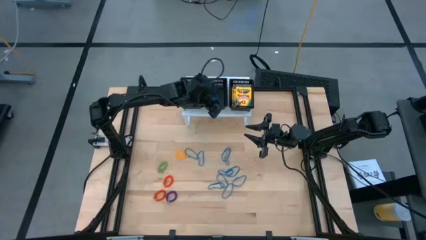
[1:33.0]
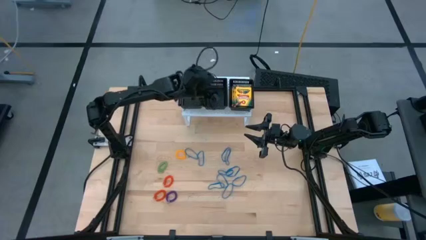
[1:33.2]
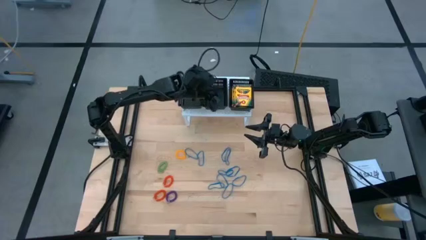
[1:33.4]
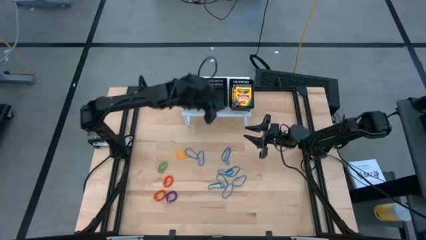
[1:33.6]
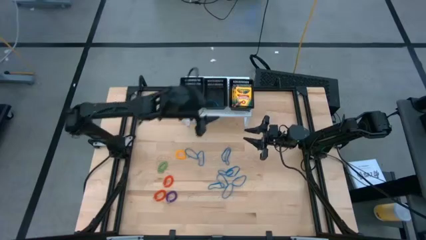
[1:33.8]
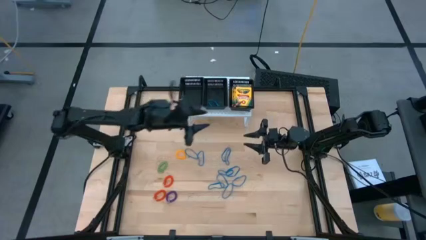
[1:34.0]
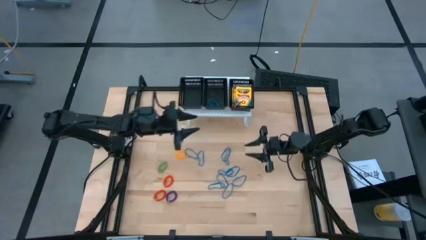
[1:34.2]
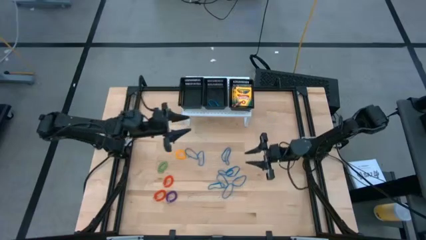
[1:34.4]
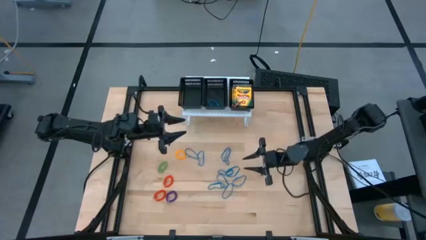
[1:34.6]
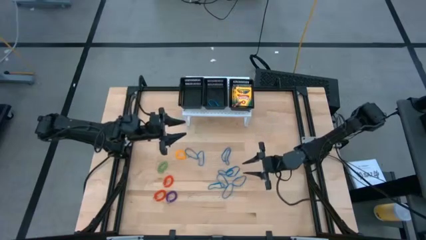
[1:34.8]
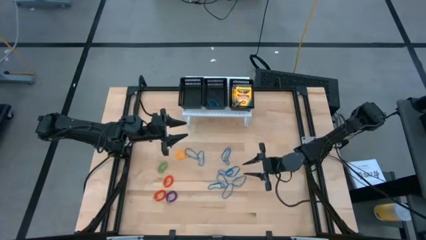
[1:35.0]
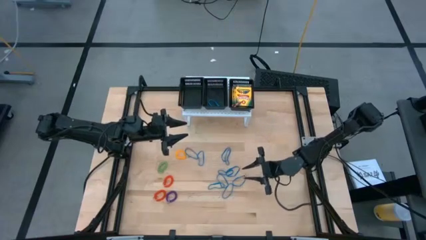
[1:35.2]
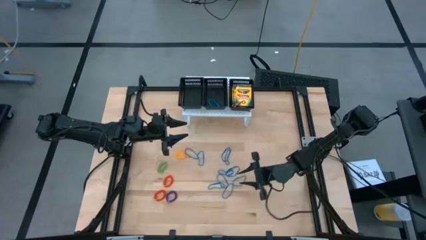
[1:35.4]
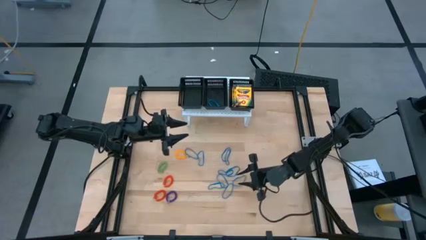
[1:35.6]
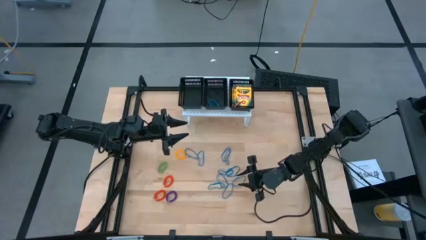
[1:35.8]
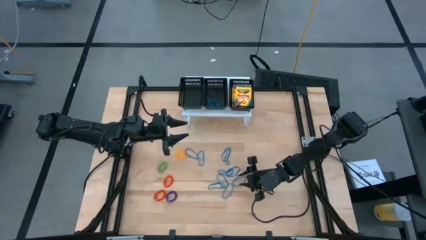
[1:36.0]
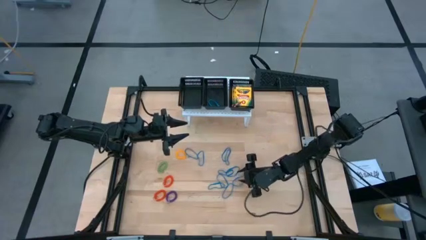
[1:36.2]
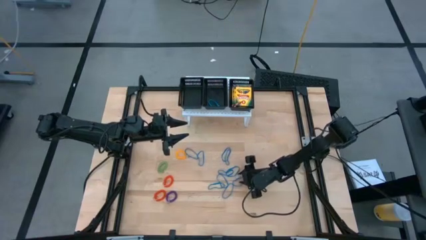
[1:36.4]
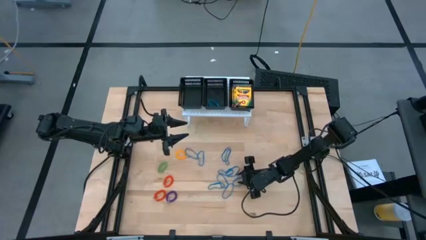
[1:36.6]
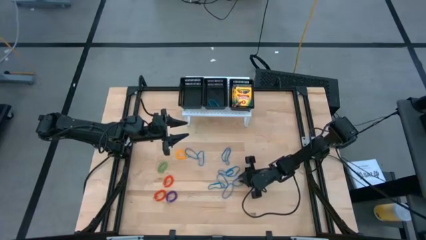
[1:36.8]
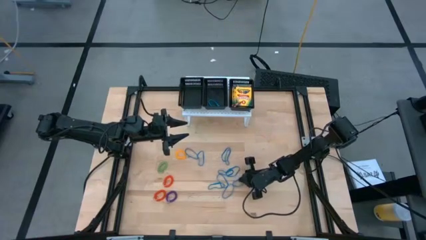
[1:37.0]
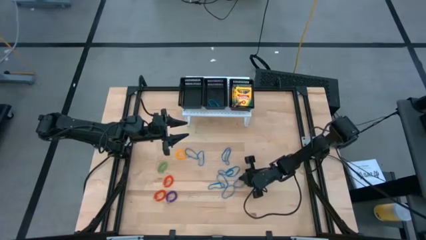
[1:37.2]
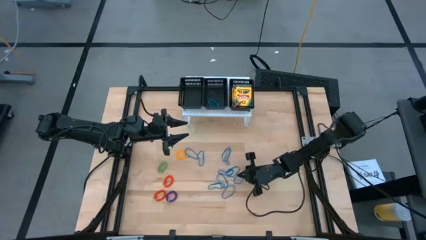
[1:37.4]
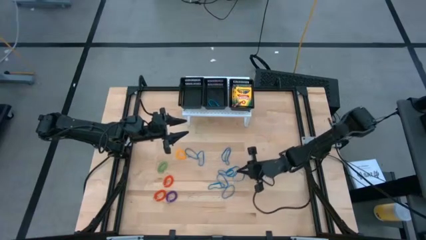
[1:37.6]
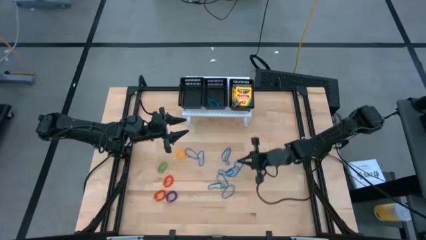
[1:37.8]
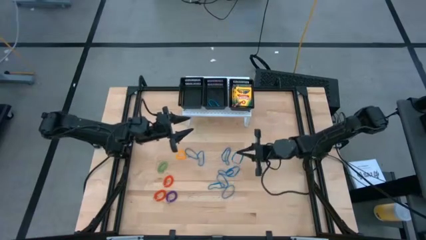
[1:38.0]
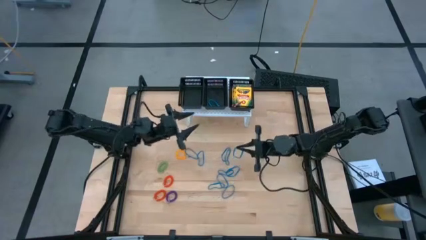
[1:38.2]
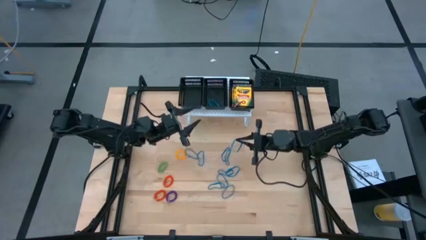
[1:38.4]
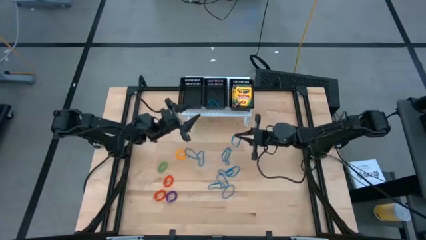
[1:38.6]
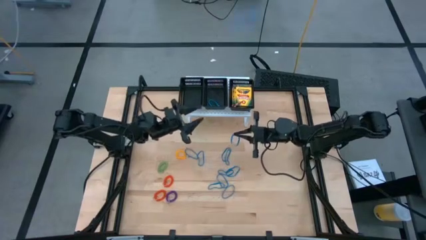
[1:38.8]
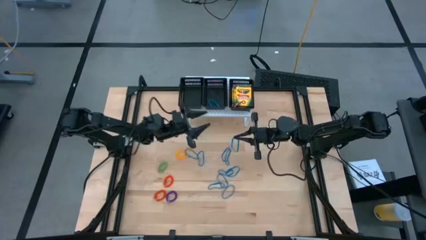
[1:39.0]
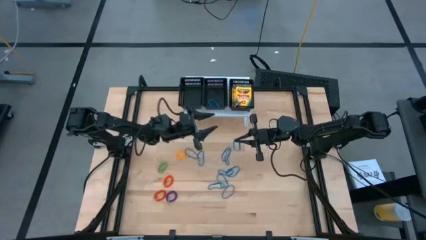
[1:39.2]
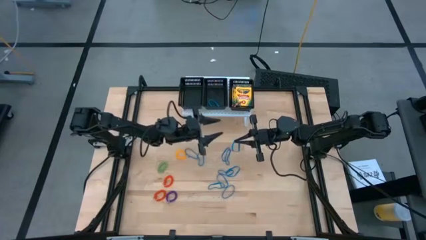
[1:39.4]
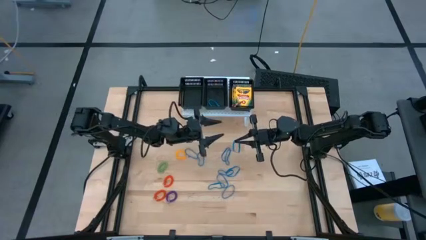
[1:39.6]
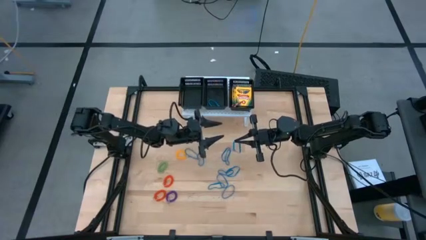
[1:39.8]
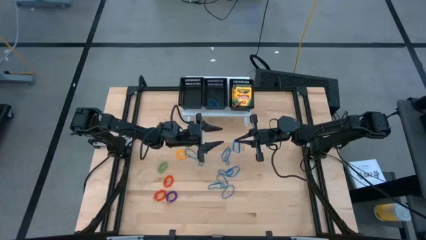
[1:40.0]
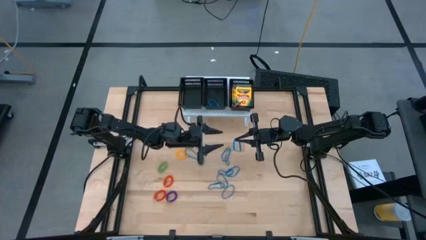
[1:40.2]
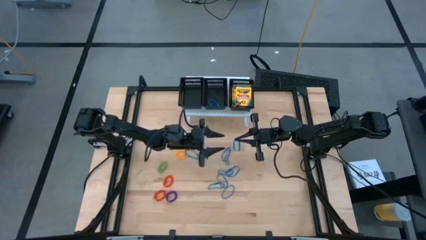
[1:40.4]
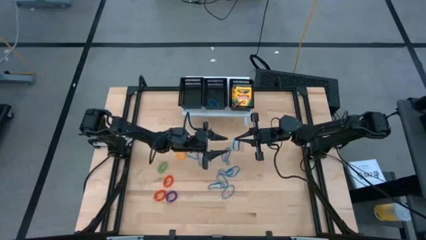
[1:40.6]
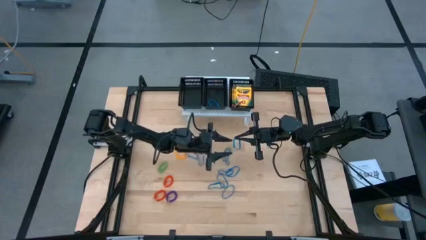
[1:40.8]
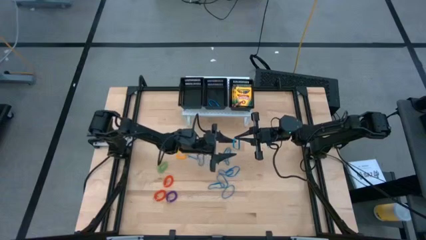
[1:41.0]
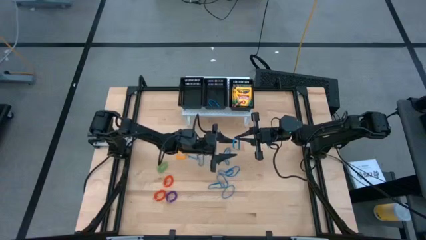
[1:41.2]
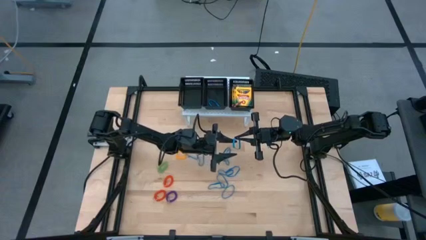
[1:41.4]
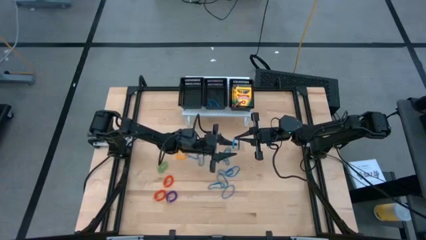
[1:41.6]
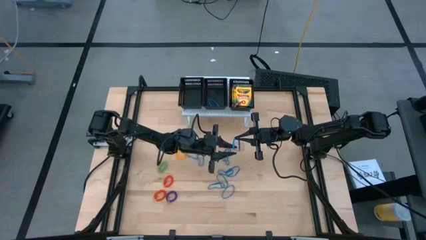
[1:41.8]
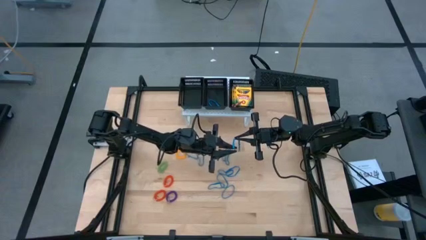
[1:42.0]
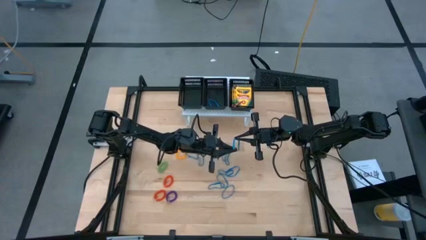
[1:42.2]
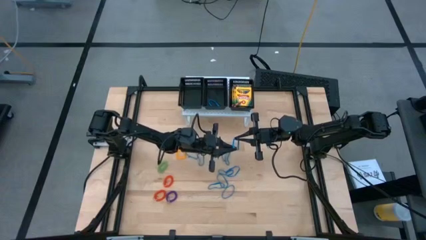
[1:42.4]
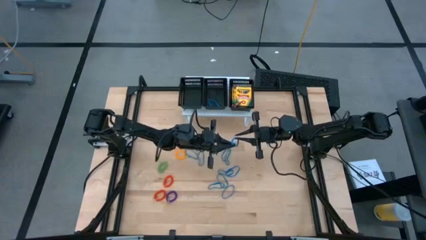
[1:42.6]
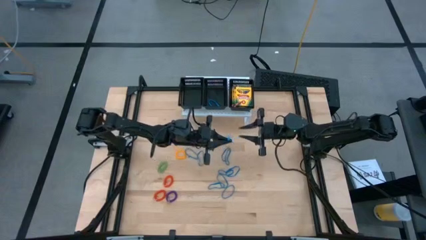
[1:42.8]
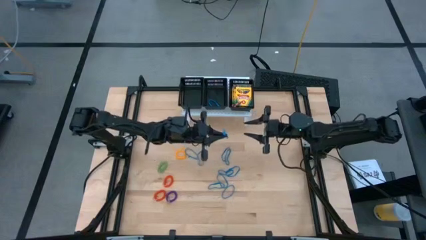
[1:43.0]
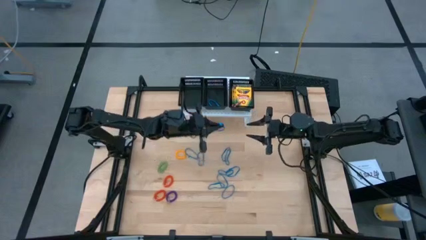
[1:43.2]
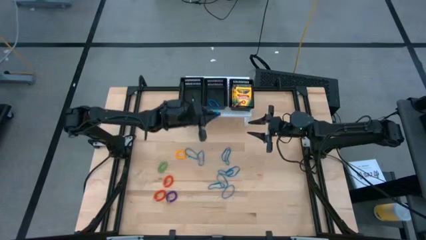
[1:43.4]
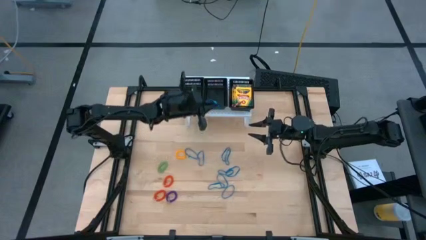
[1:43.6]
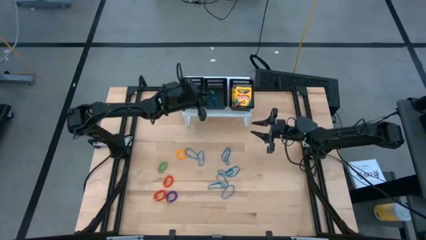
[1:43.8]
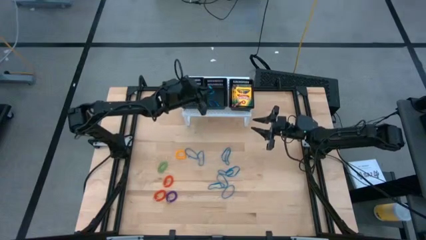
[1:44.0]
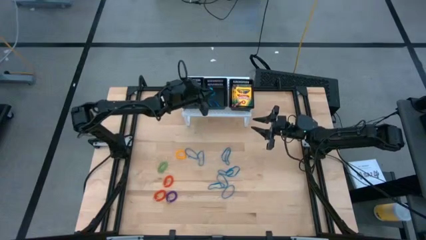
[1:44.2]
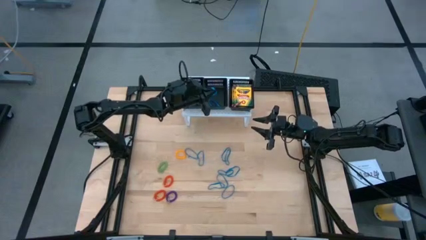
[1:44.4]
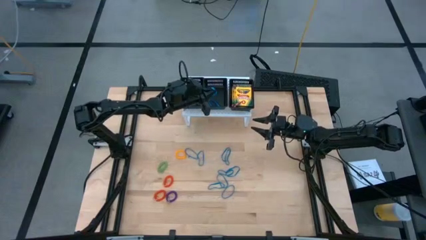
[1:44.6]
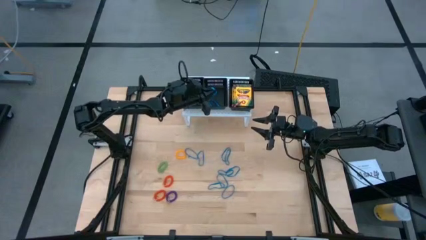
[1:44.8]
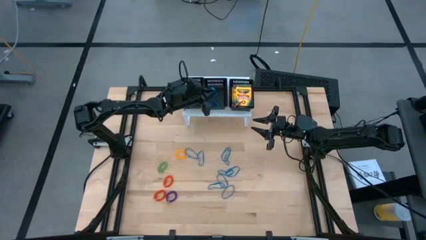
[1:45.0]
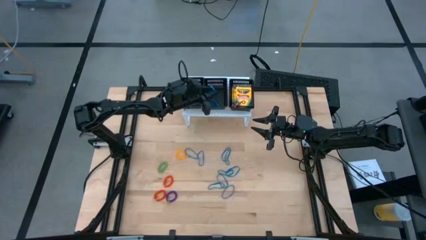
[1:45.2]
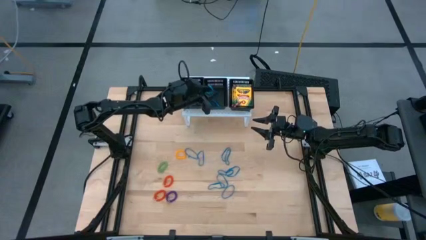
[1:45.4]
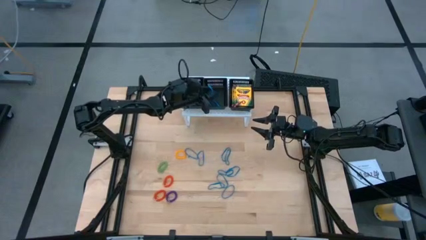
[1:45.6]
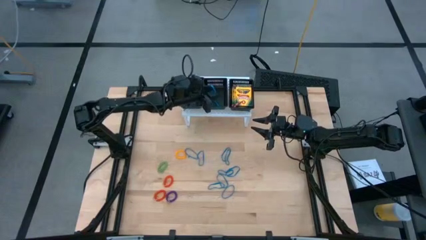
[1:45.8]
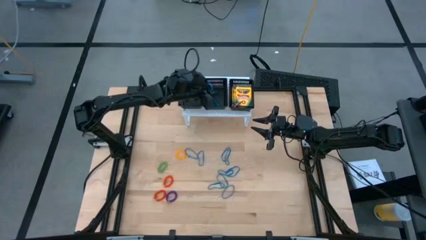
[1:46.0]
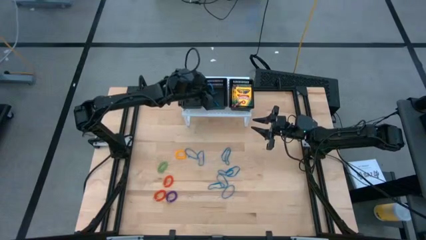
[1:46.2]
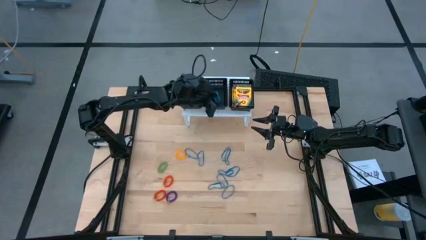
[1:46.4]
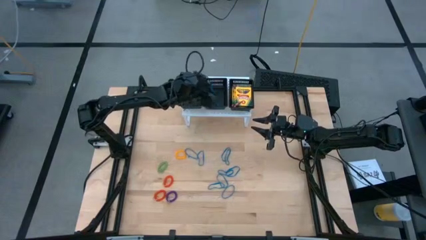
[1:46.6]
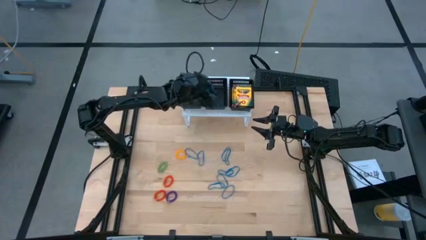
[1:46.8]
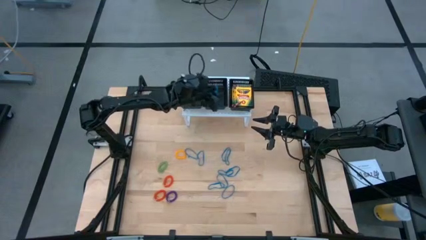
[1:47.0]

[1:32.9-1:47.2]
Task: Pick & Place Office Desk Supplies
Put the blue rubber band into the middle black bin
